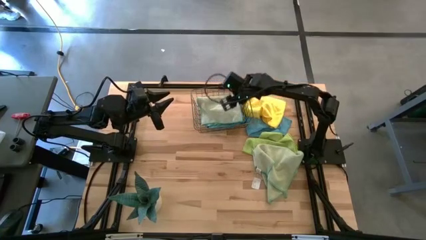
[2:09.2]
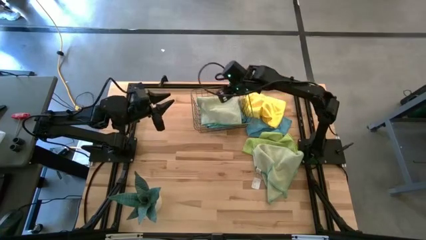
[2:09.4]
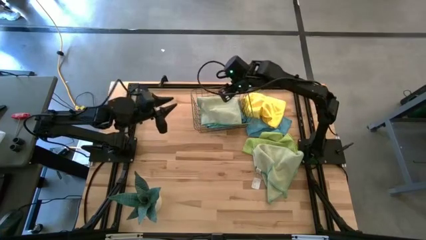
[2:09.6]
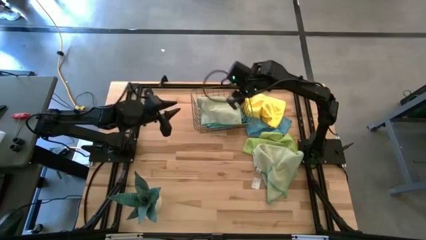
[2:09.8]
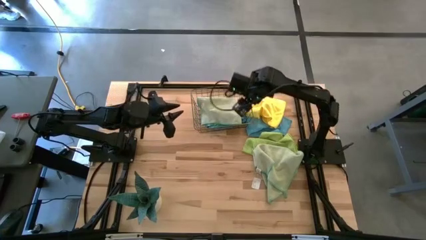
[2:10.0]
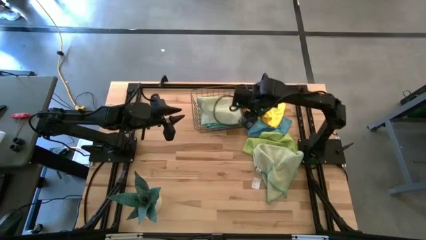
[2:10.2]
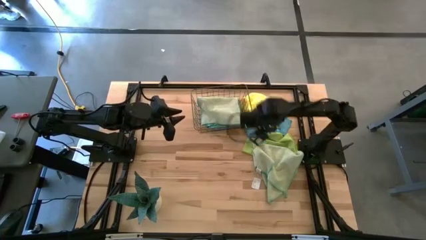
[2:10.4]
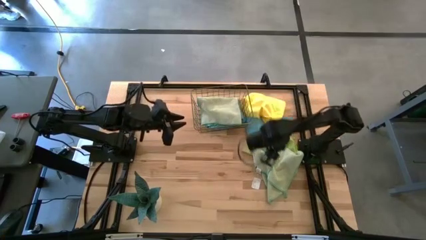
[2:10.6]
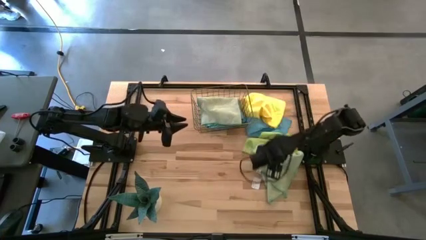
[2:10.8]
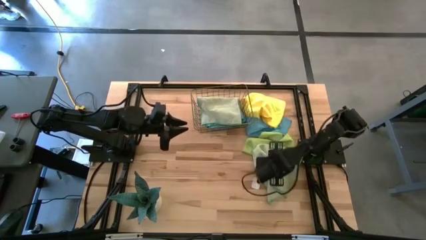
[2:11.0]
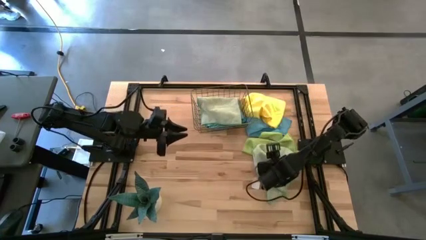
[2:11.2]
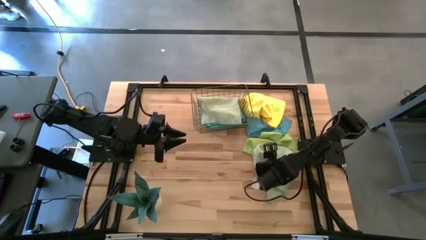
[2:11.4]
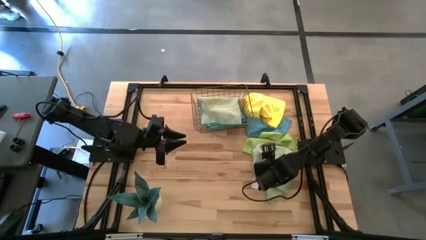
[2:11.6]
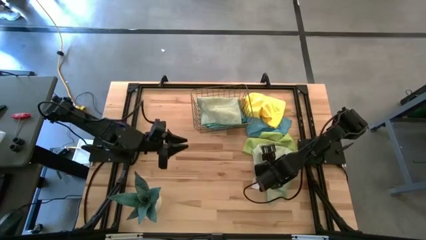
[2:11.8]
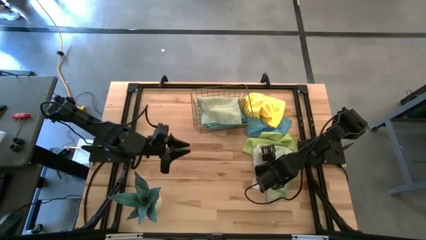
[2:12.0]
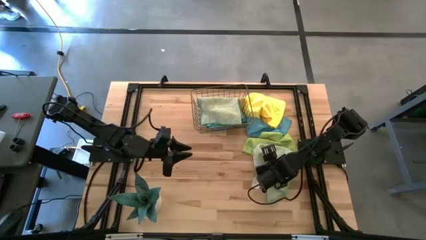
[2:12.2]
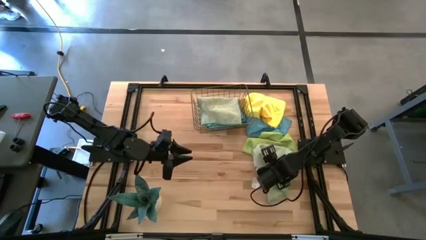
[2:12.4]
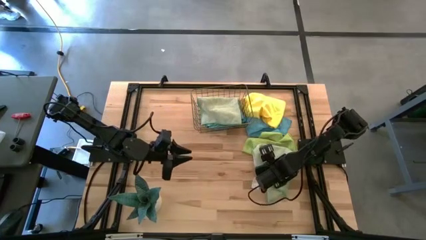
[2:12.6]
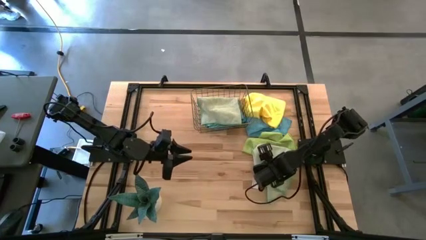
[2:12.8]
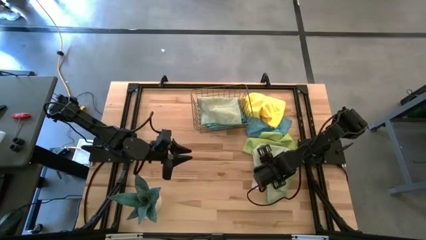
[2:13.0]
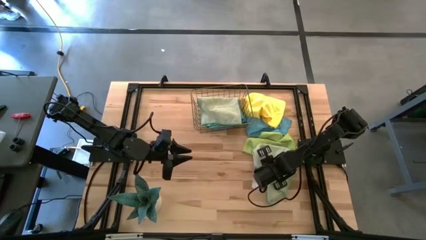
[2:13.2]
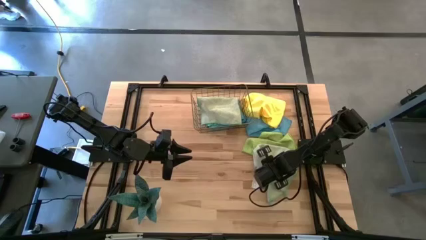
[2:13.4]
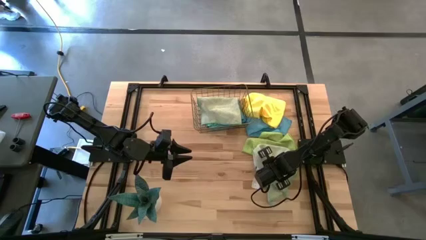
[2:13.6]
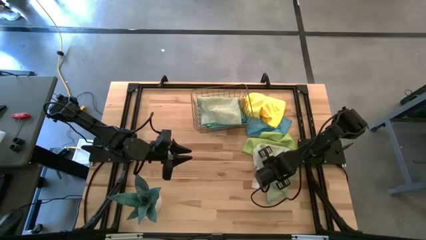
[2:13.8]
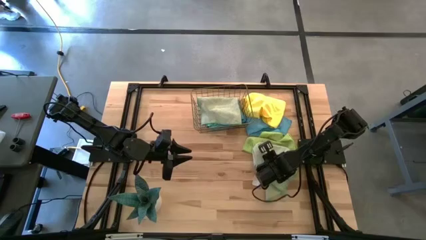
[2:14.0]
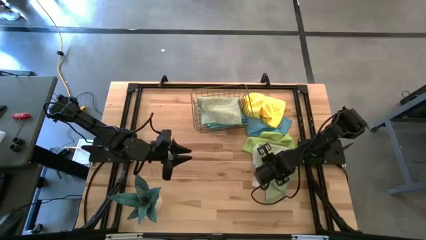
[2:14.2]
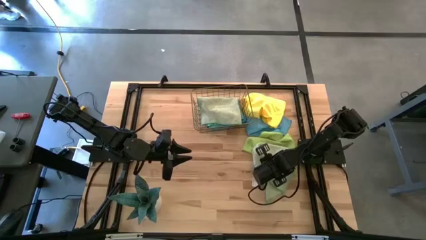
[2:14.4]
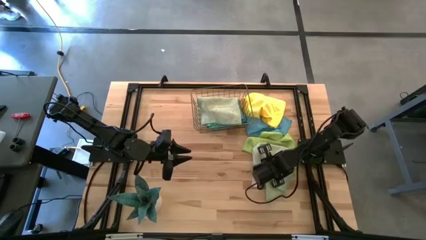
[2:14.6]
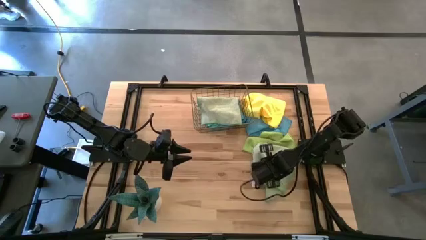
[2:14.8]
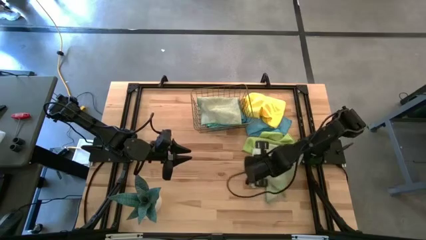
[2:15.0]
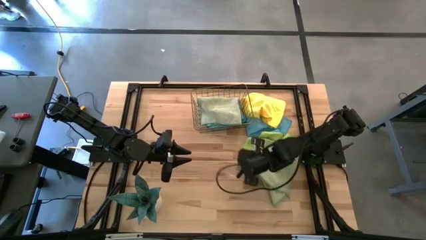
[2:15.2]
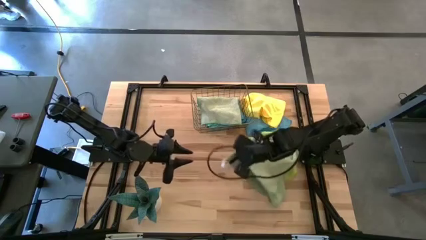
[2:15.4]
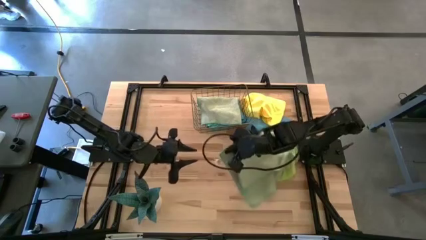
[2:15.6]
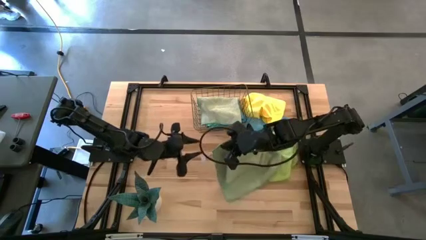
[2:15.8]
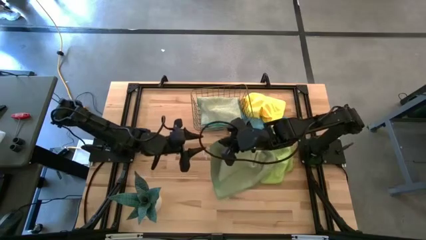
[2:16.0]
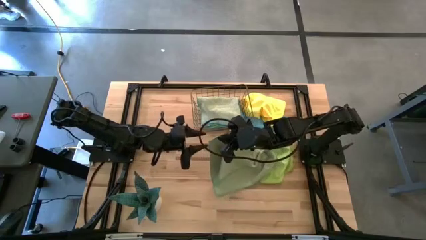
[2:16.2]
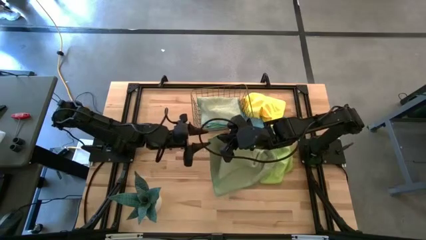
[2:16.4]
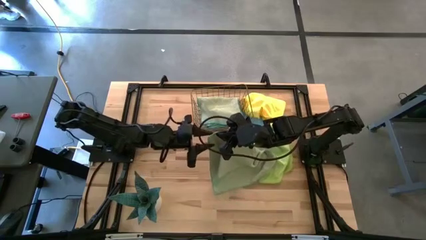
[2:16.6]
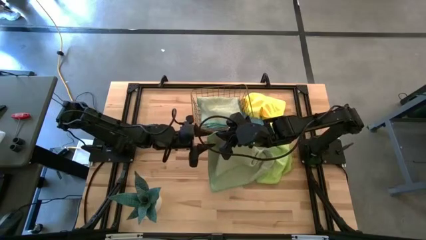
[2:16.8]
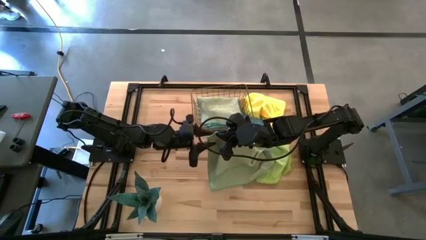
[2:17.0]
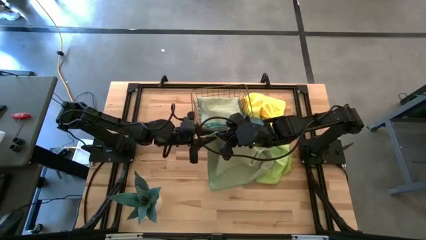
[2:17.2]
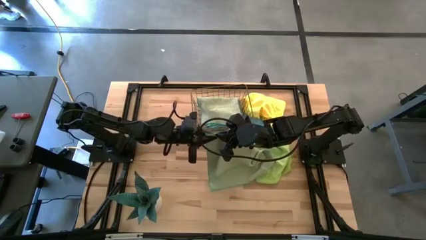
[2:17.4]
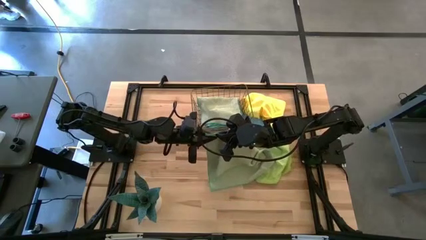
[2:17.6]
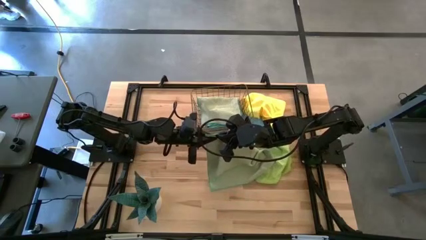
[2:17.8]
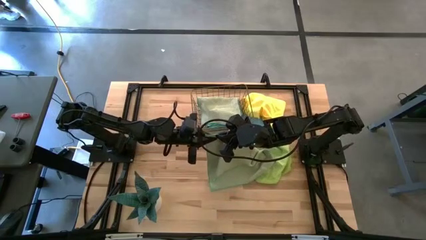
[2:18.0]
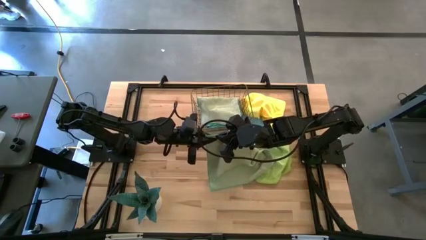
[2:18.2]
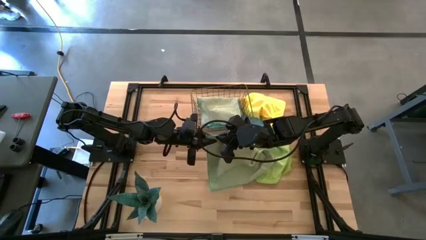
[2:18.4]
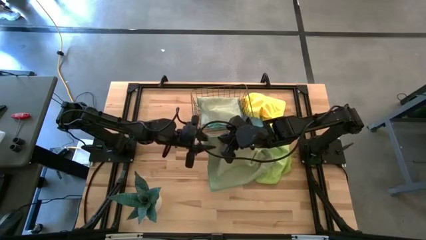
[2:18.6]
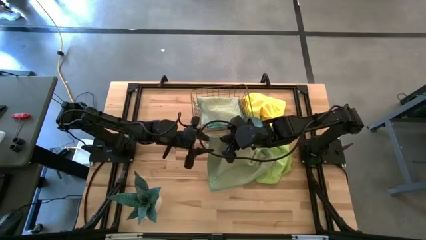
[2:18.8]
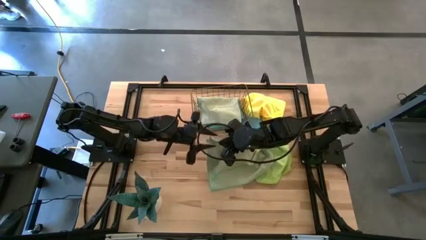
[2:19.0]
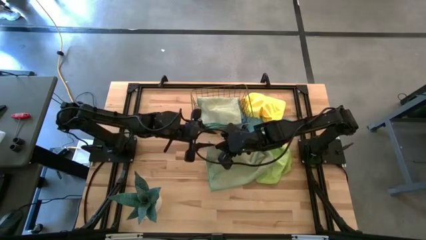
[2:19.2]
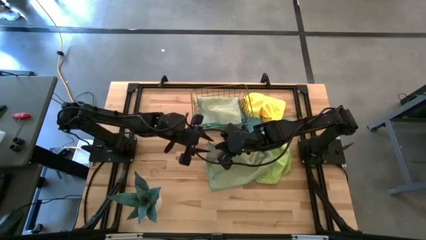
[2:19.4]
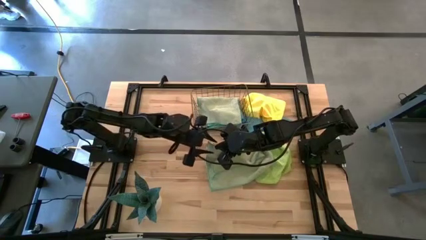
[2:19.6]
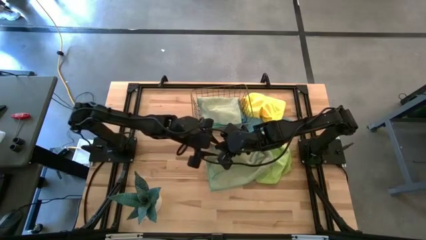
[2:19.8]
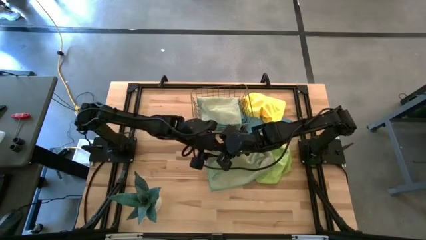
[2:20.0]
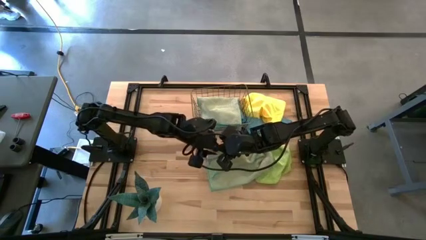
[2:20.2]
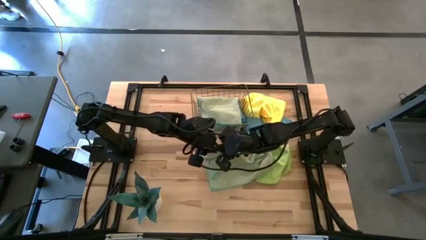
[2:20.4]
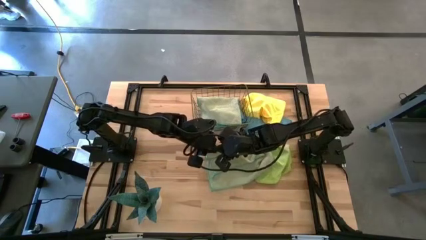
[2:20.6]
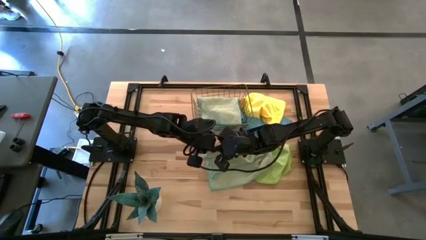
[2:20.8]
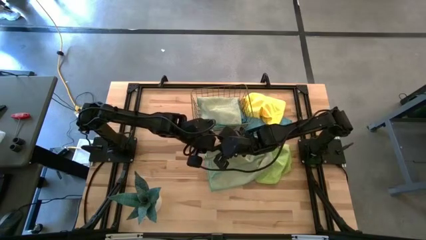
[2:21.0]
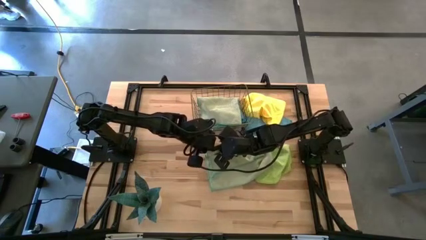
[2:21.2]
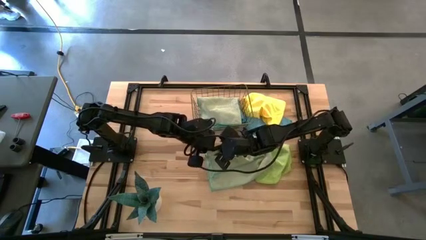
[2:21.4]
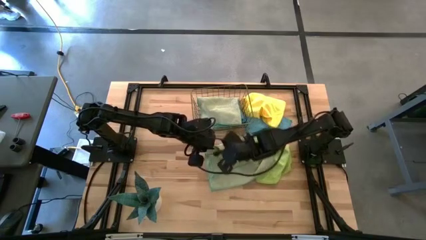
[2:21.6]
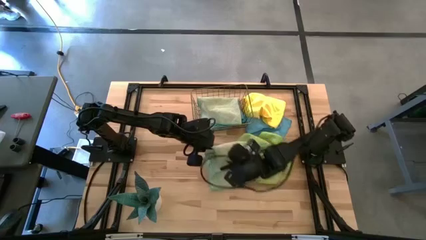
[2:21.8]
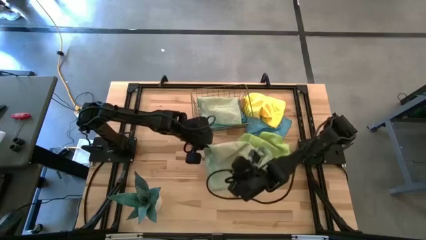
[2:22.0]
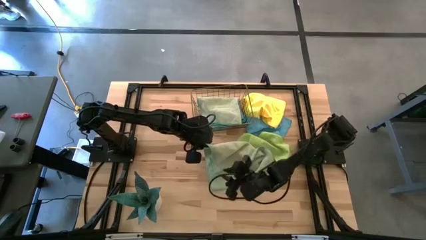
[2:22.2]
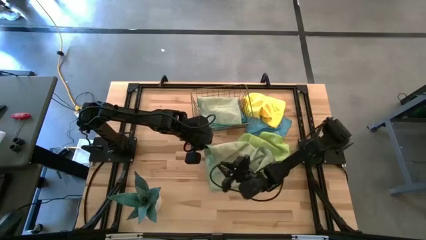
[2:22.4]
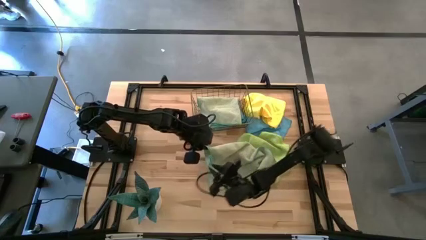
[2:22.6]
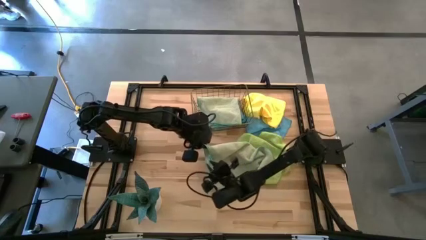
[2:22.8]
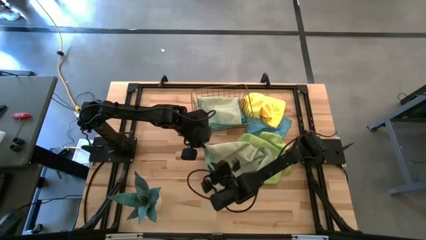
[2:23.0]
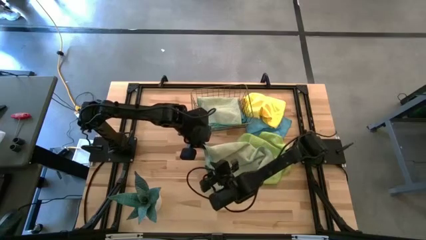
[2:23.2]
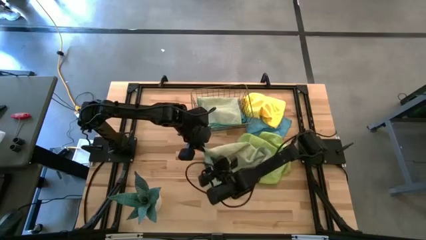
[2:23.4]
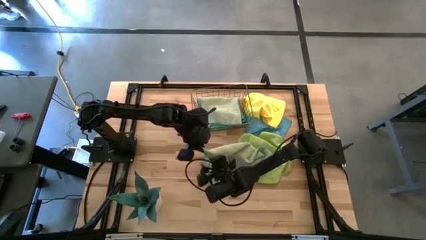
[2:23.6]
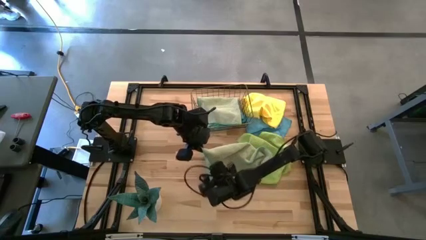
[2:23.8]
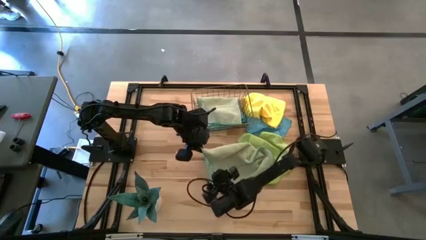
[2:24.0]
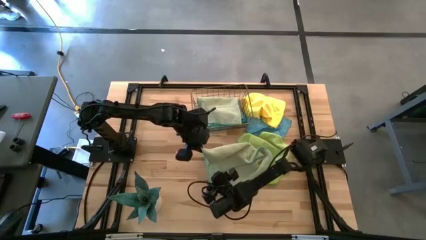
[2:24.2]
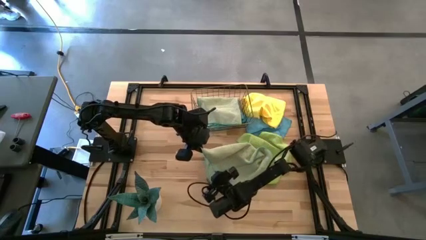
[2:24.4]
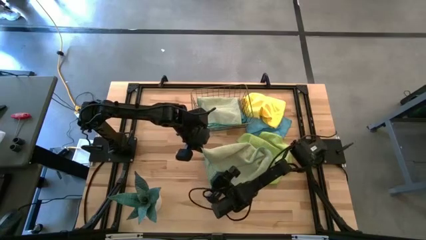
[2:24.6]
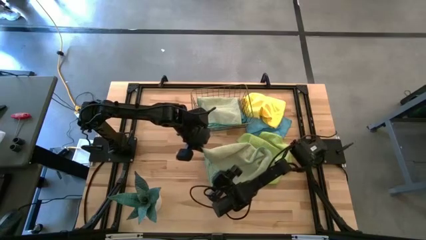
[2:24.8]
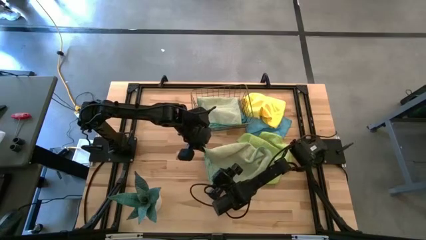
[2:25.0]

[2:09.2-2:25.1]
Task: Fold microfiber towels
Fold the light green towel
